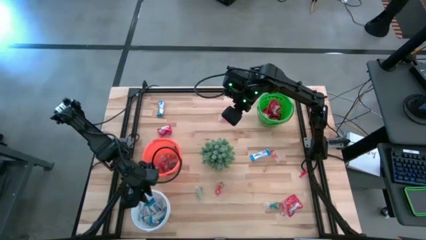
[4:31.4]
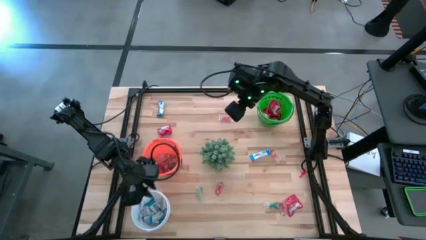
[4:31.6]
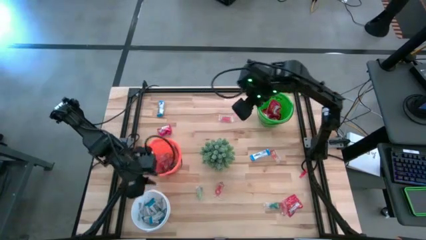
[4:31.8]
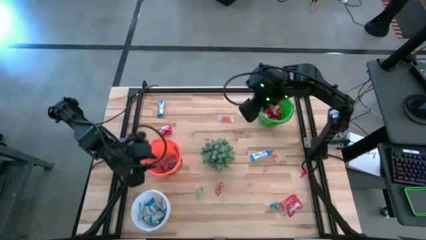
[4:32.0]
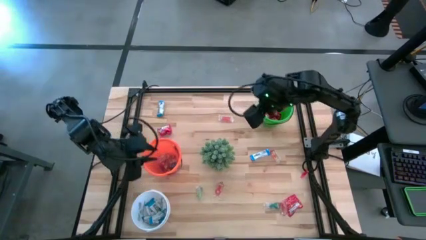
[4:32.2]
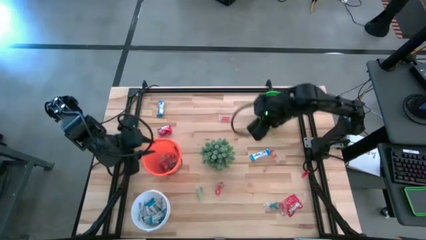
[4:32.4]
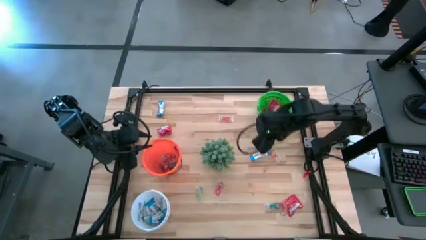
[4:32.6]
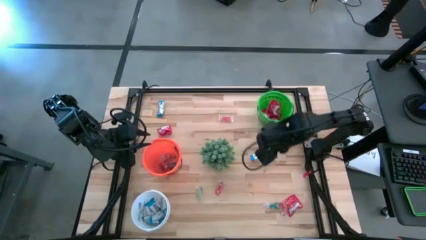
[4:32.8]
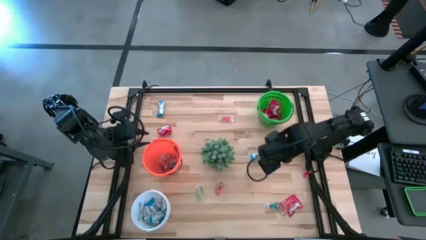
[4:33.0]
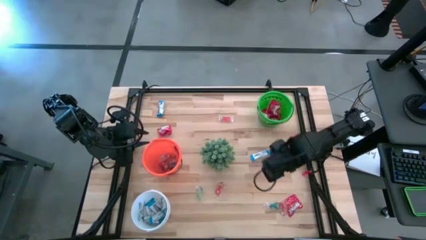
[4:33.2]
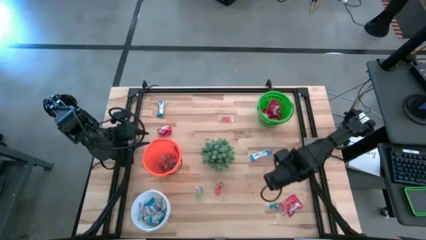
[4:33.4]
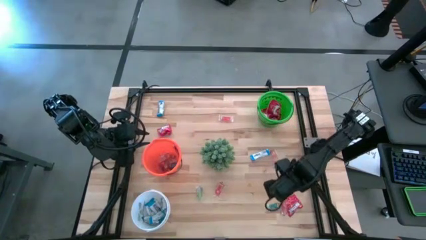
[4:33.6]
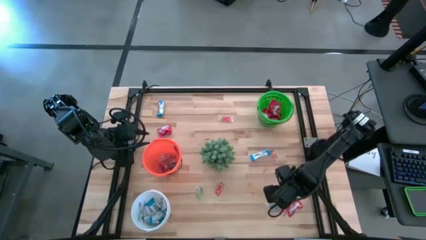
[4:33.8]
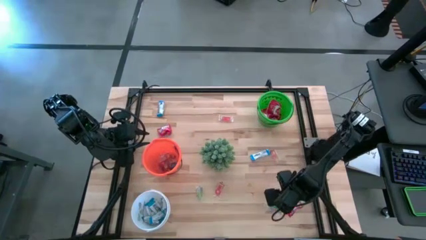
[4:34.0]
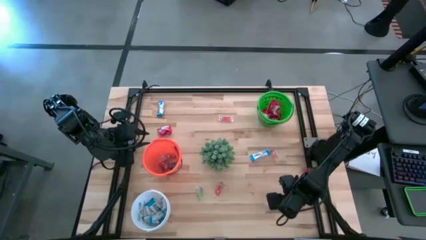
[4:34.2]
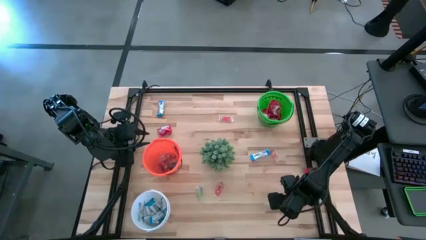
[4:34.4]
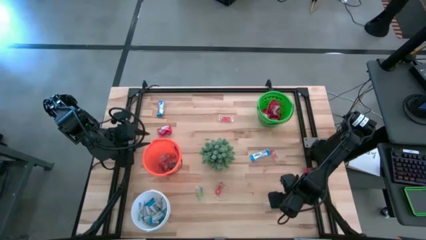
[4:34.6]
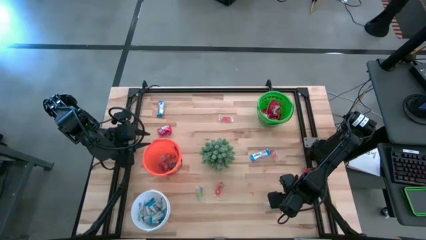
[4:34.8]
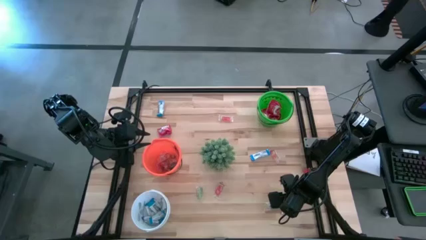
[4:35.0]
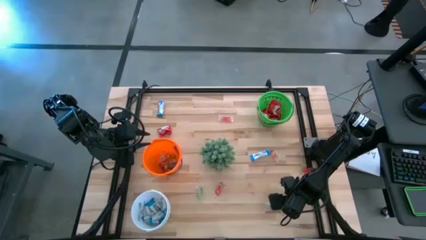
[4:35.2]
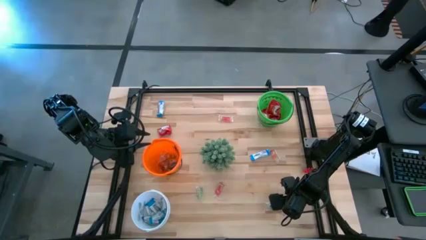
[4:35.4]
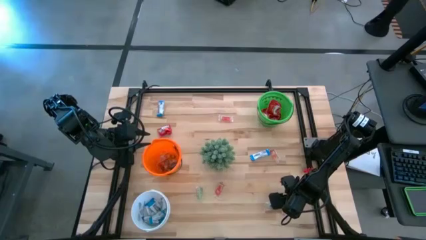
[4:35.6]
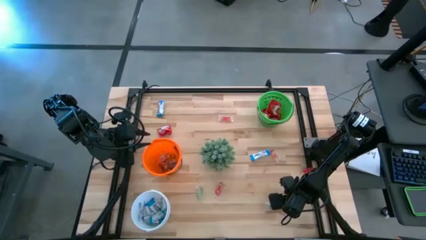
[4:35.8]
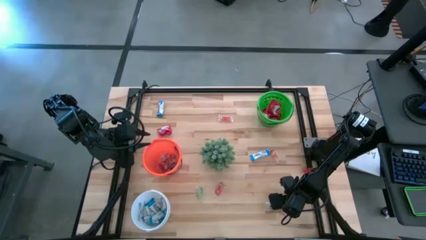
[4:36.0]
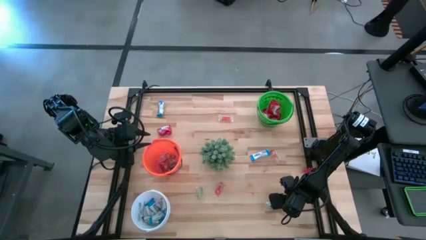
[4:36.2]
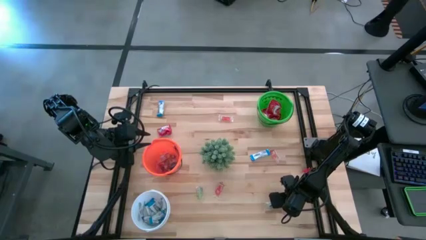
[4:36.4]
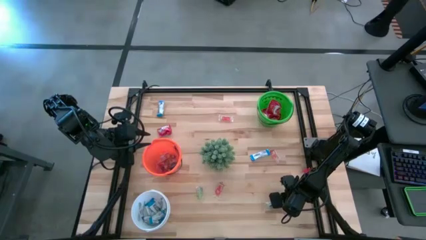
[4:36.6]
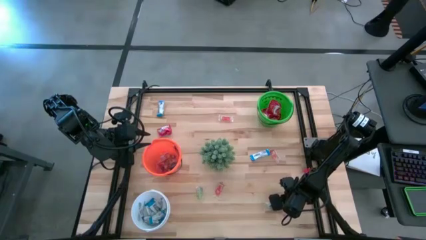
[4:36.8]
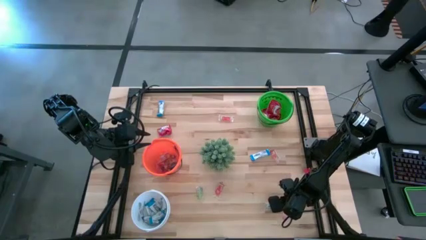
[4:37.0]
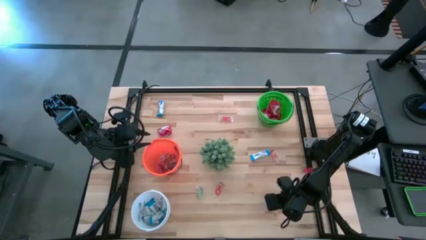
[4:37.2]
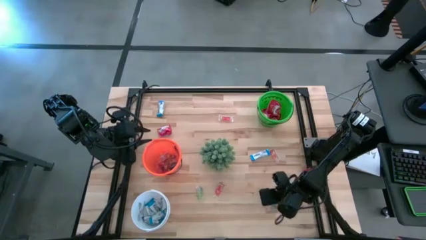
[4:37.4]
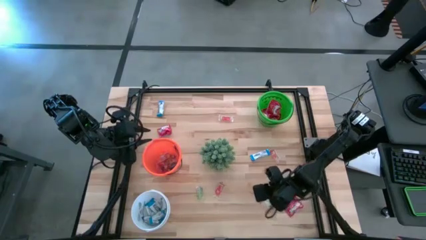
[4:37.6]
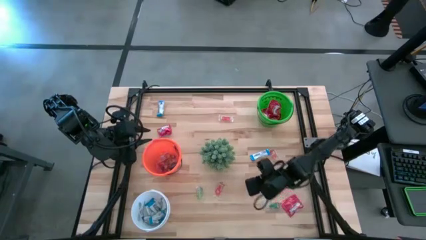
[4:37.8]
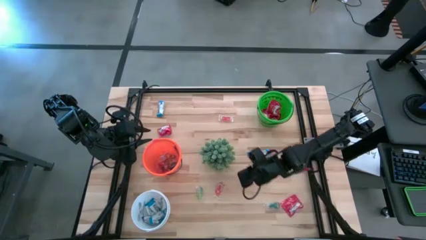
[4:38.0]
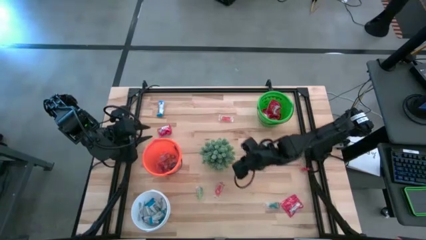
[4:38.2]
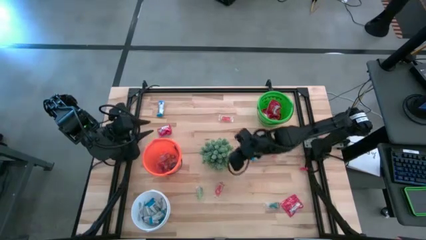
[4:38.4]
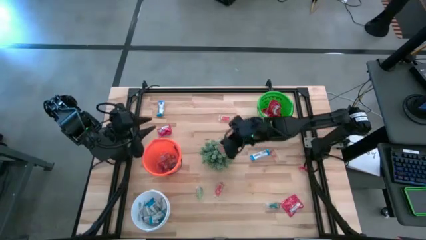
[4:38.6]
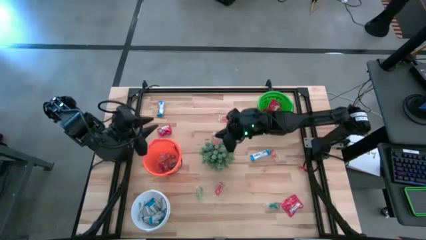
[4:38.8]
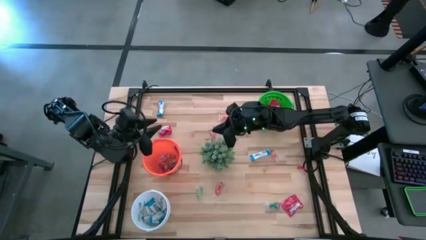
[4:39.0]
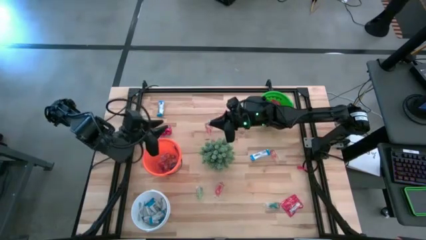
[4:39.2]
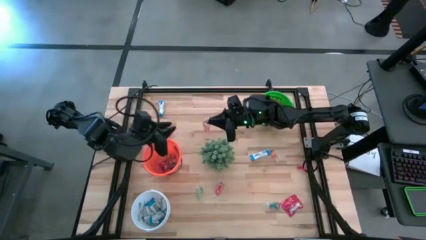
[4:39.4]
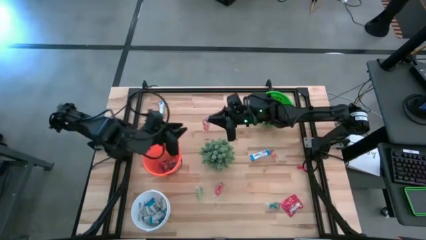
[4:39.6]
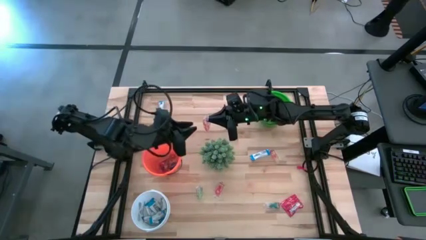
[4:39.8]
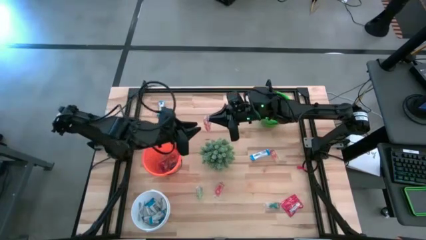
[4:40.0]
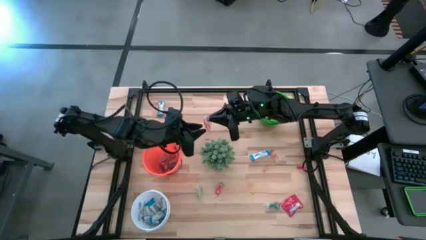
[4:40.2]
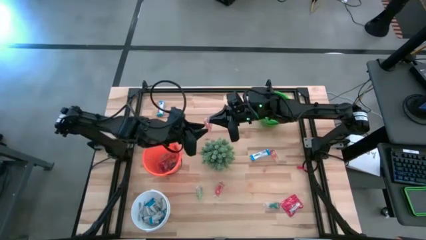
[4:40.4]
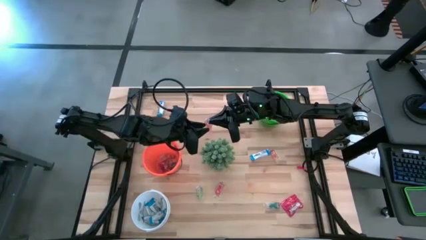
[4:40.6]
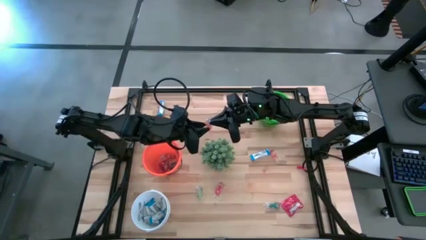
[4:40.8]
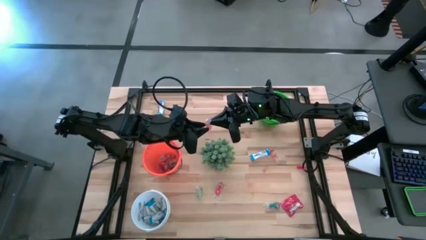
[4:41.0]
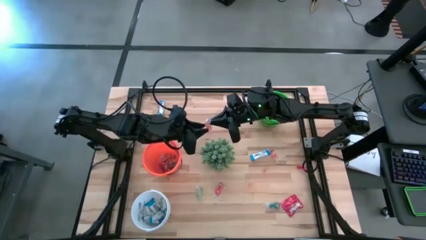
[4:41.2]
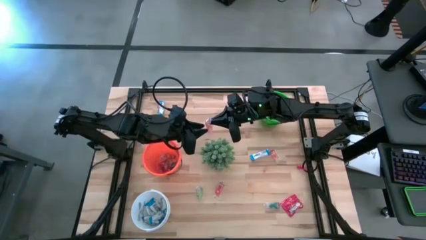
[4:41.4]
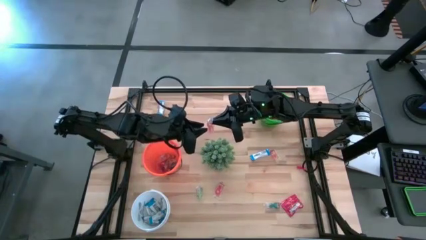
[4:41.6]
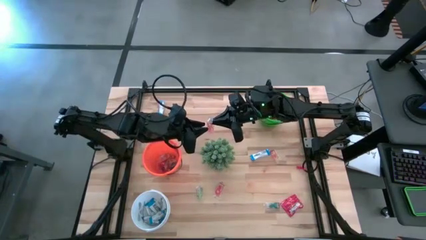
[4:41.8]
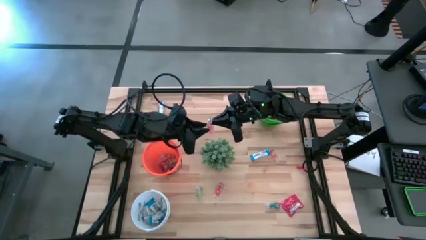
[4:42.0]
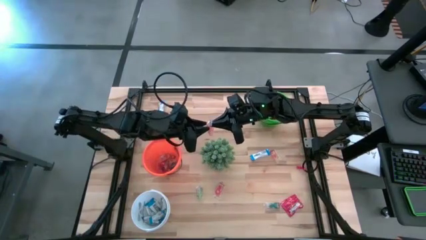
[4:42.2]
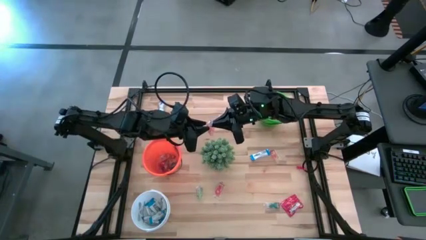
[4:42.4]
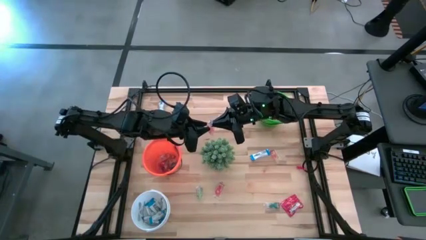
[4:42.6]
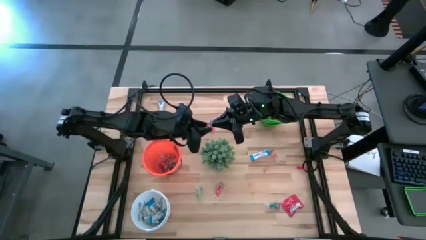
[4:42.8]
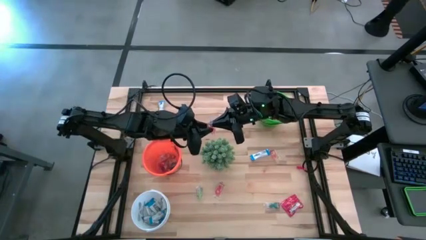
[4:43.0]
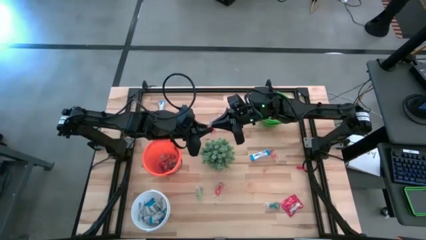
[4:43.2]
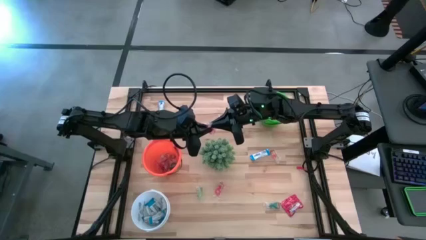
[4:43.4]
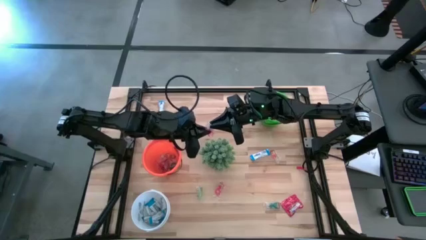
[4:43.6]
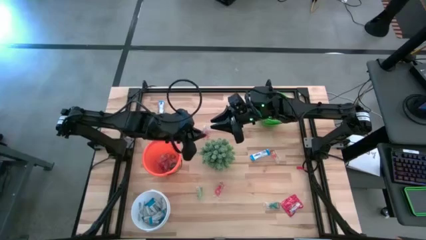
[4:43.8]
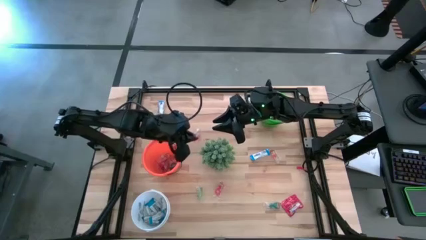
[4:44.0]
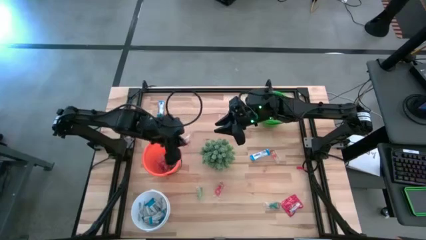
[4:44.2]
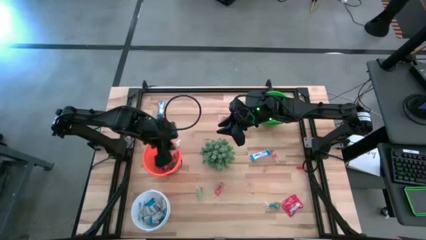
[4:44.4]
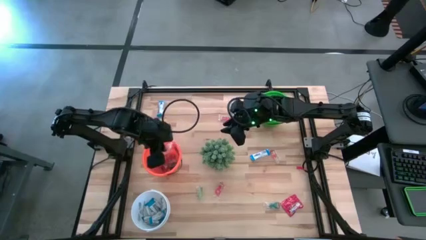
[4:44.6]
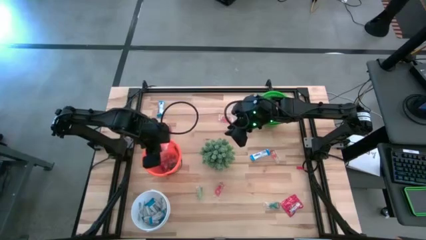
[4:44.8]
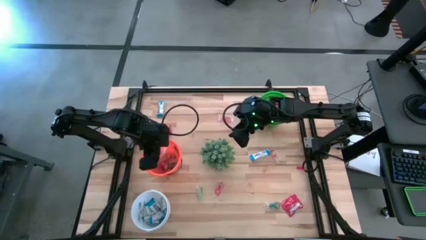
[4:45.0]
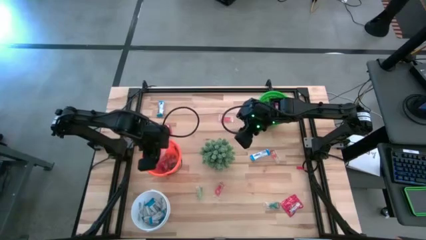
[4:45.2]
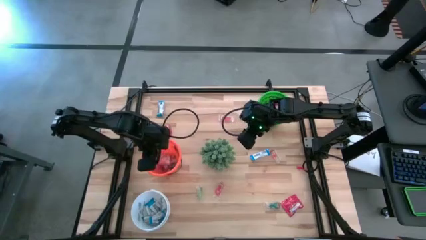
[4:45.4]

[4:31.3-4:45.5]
Task: Sort candy
Put the orange gummy into the orange bucket

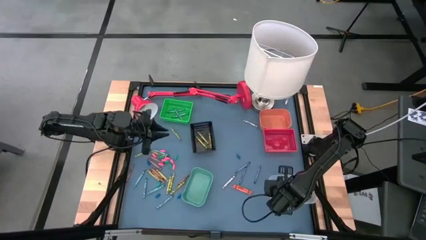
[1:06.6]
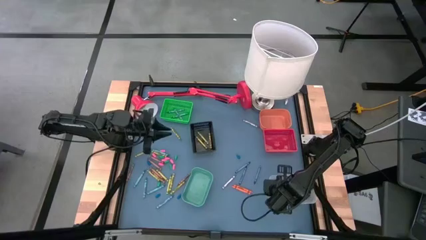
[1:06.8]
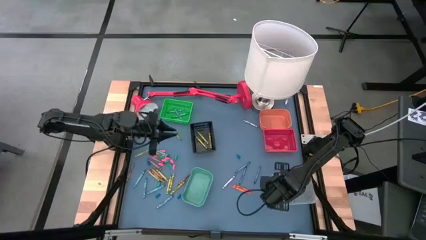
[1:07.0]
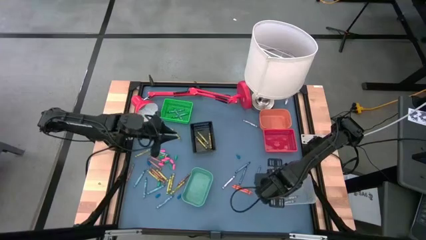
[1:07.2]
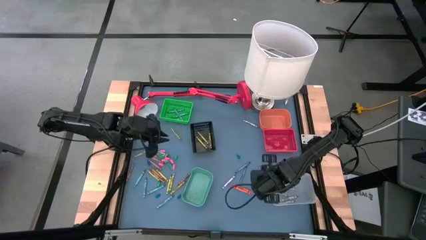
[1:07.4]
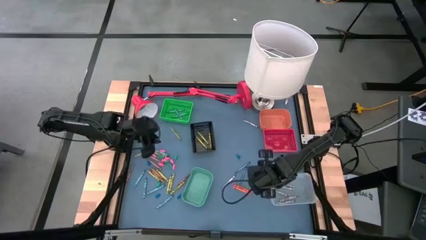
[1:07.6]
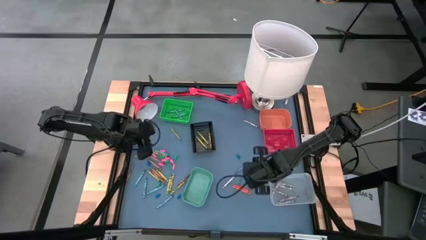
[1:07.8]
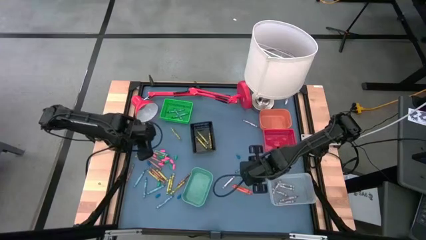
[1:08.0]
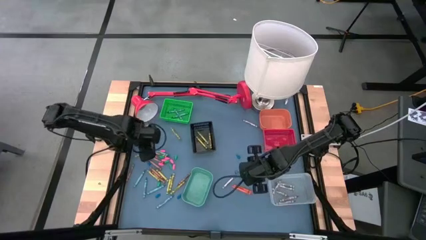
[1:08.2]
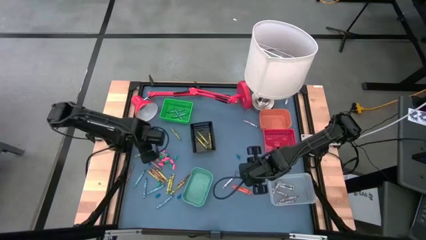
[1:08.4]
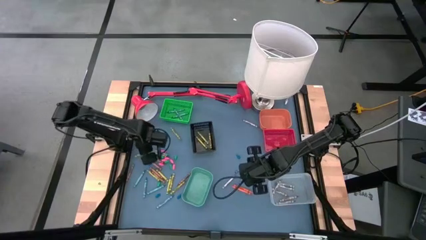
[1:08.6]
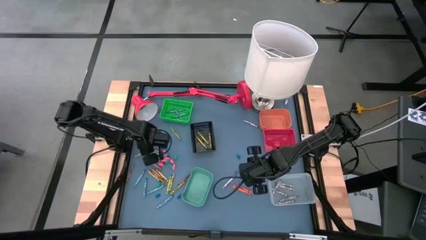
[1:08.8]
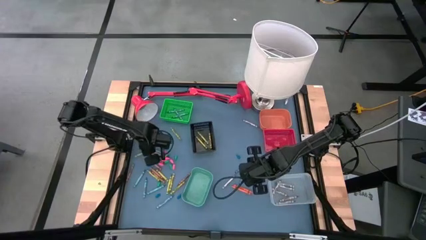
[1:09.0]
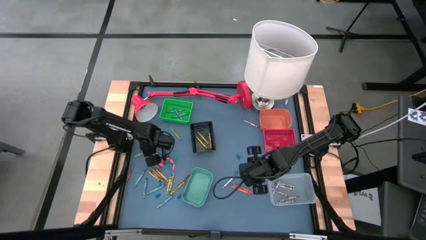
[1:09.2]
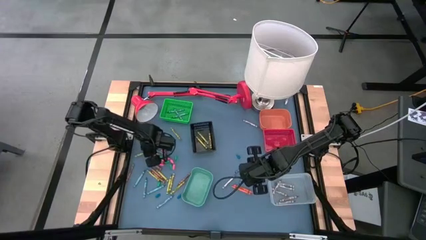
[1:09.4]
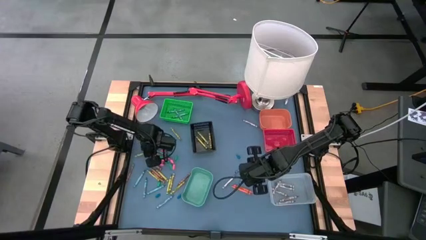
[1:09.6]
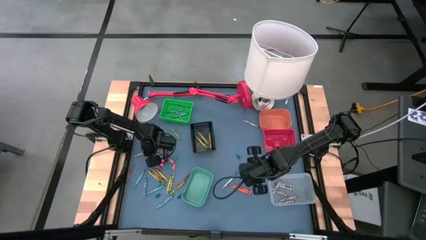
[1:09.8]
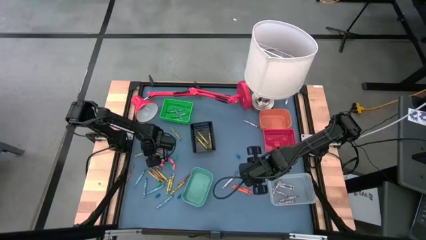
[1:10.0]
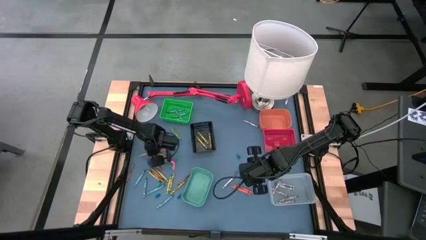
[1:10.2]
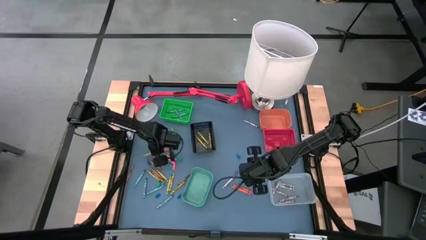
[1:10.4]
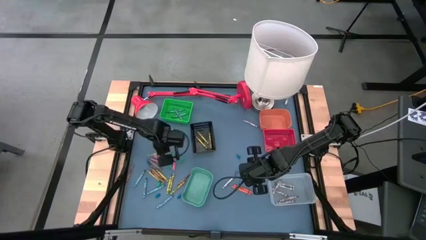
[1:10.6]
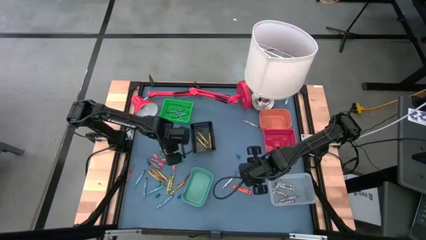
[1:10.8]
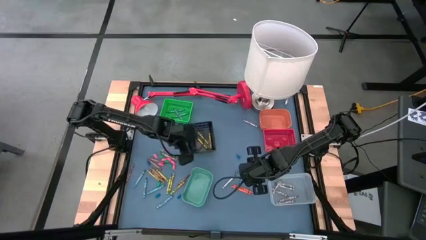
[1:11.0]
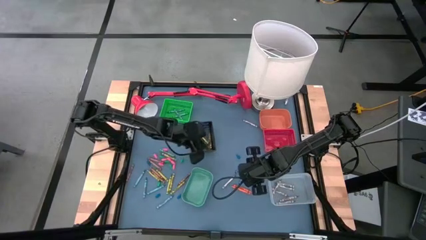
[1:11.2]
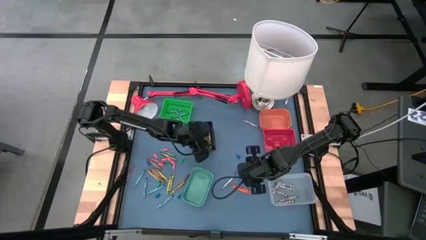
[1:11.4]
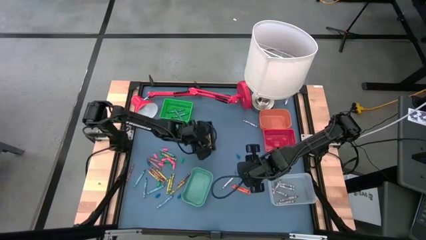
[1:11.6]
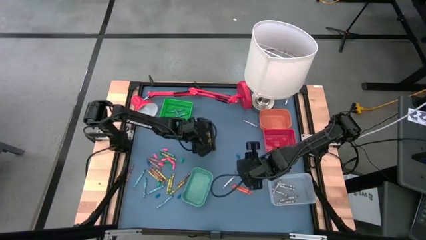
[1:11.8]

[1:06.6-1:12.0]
Task: Sort crayons
Put the green crayon into the black bin
